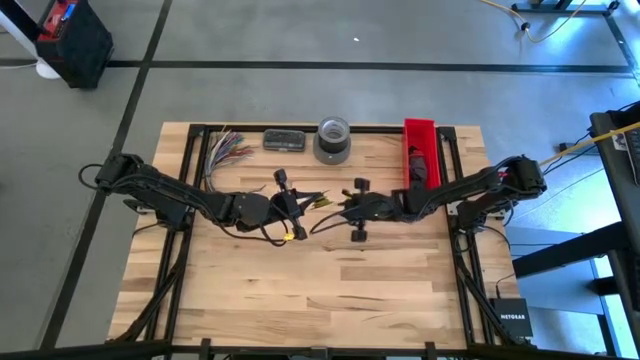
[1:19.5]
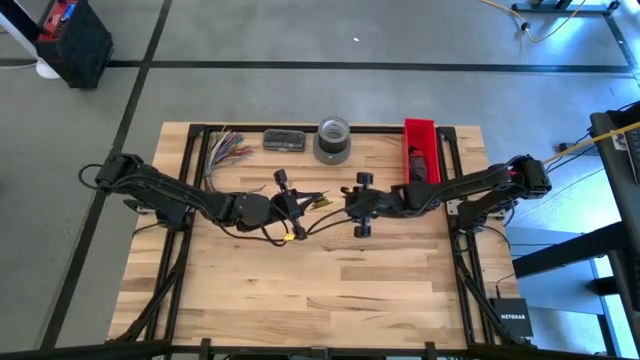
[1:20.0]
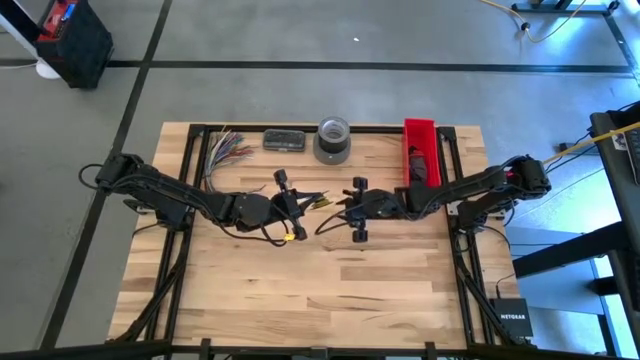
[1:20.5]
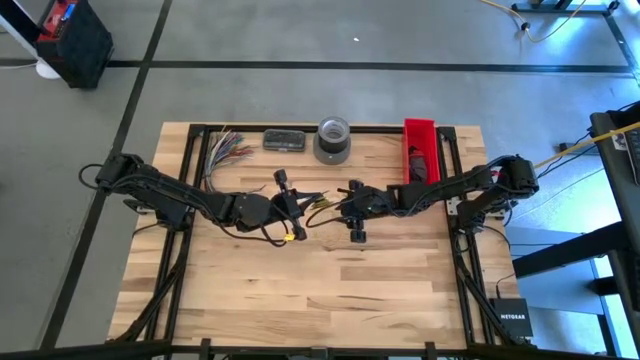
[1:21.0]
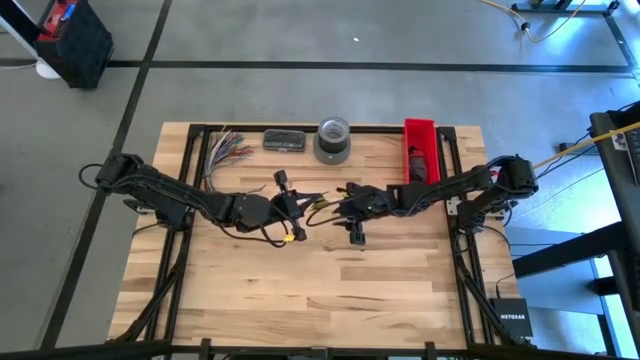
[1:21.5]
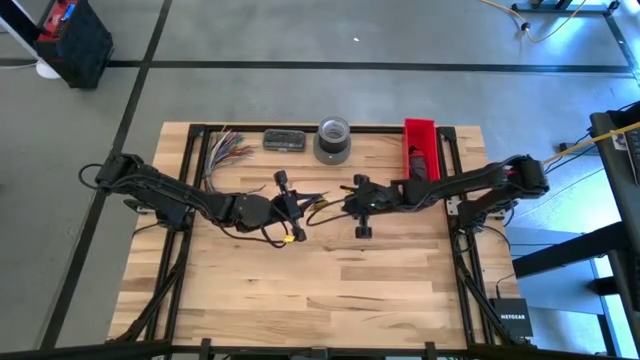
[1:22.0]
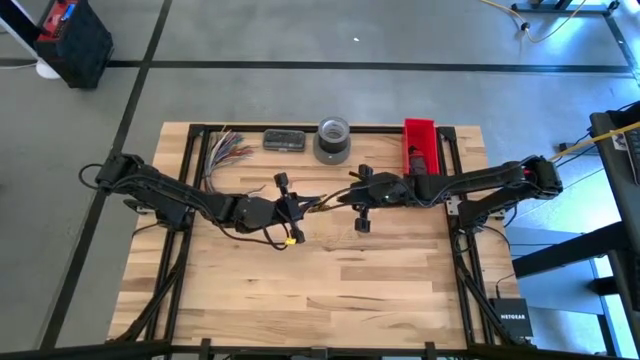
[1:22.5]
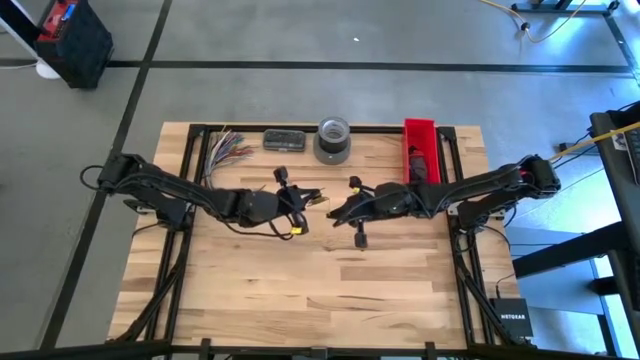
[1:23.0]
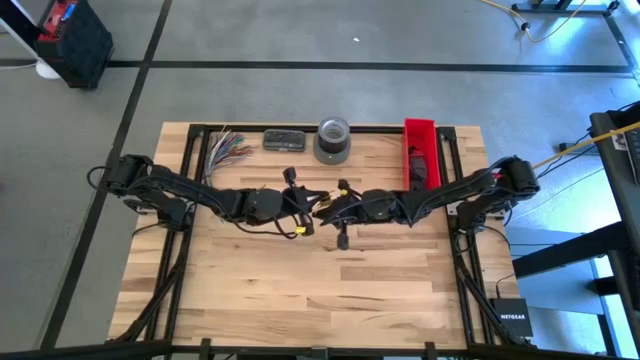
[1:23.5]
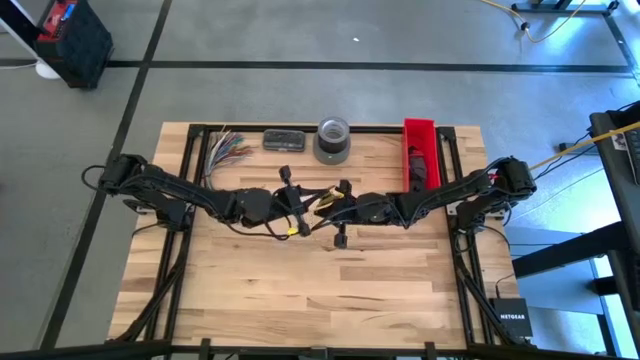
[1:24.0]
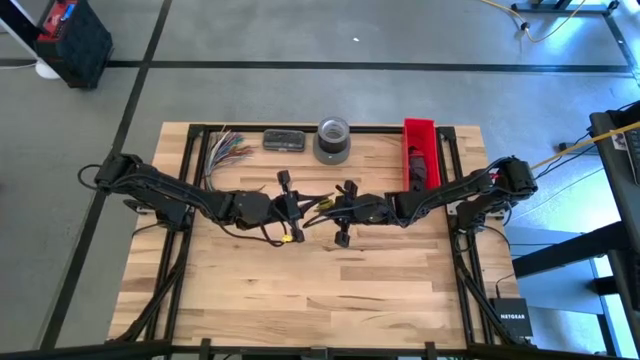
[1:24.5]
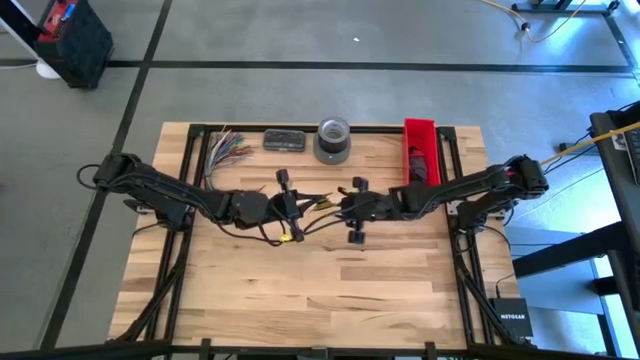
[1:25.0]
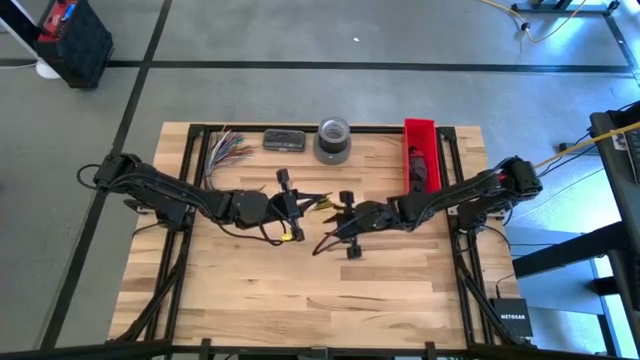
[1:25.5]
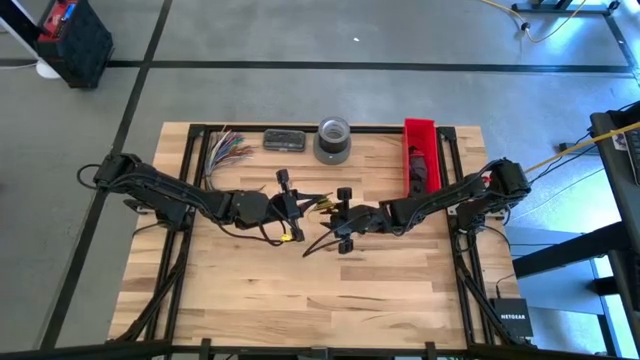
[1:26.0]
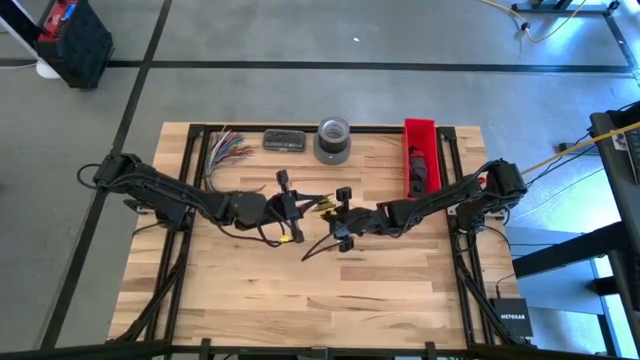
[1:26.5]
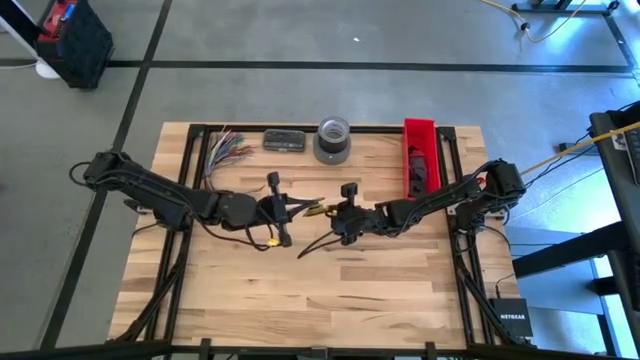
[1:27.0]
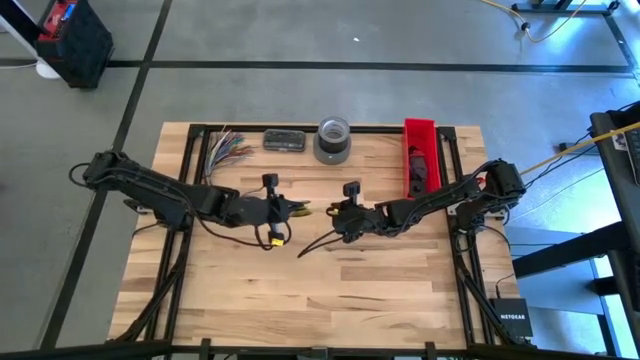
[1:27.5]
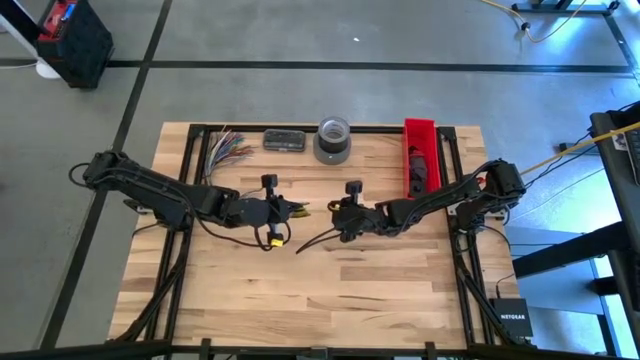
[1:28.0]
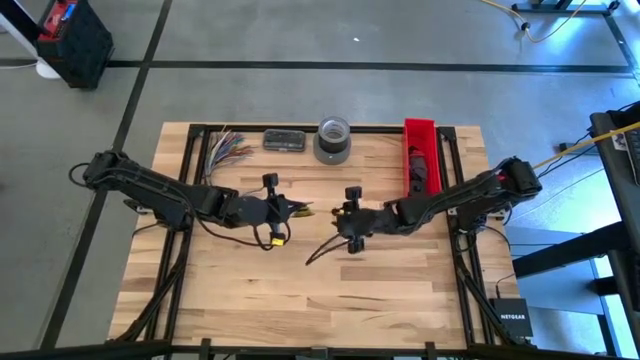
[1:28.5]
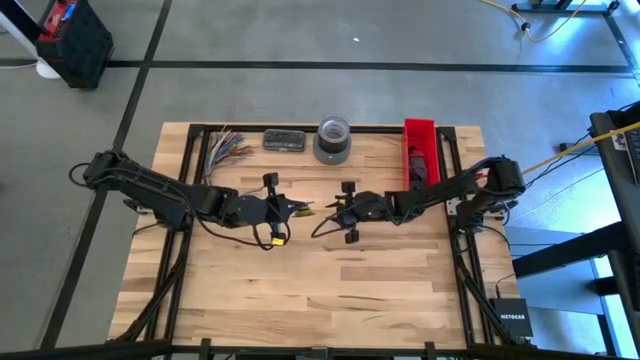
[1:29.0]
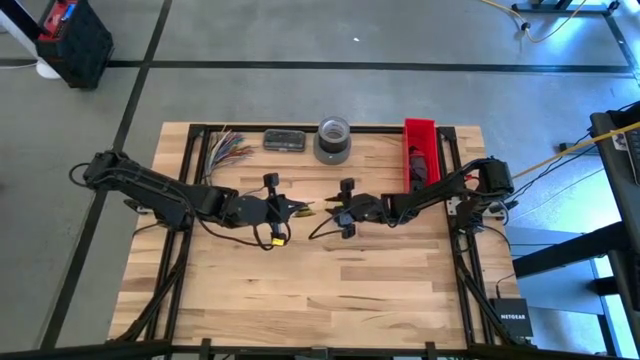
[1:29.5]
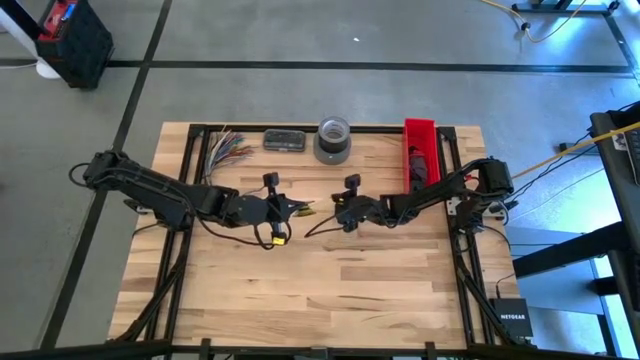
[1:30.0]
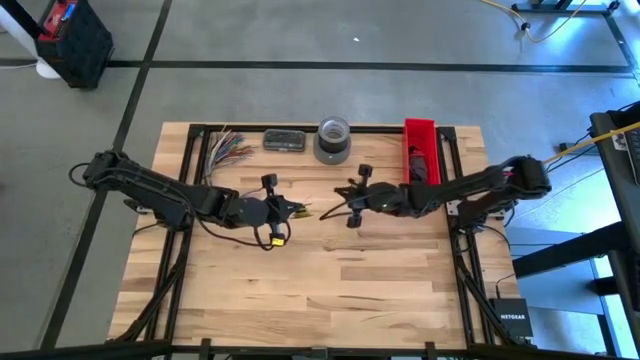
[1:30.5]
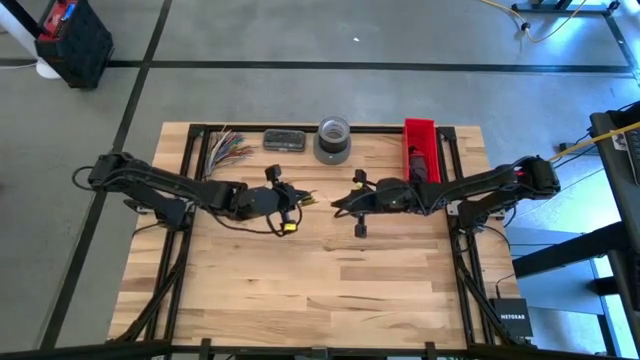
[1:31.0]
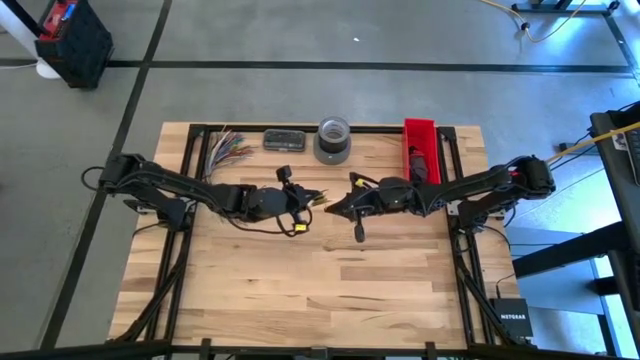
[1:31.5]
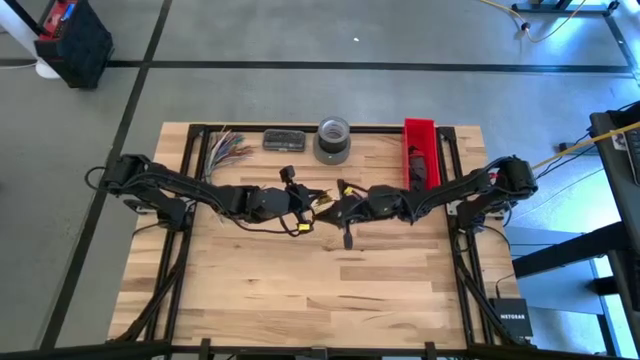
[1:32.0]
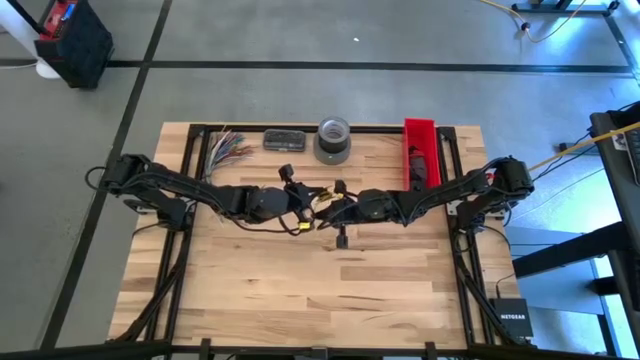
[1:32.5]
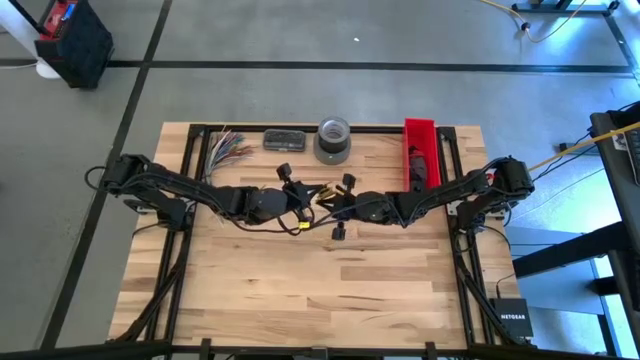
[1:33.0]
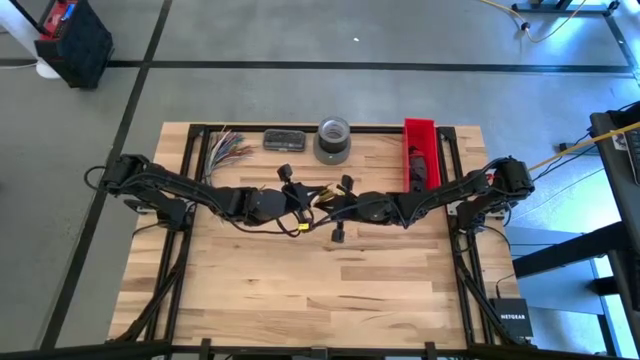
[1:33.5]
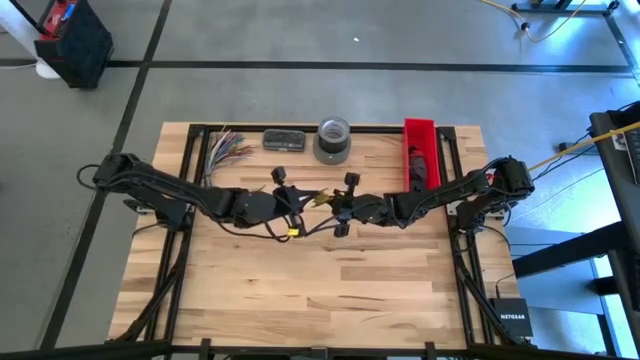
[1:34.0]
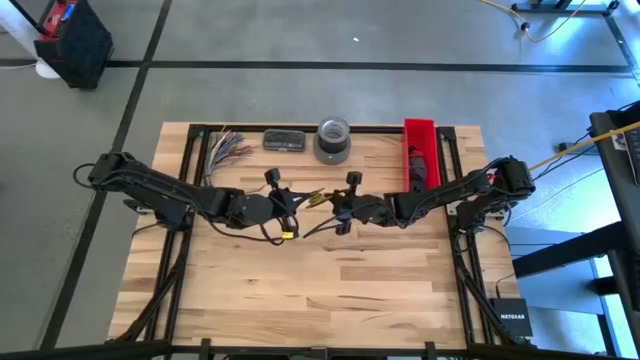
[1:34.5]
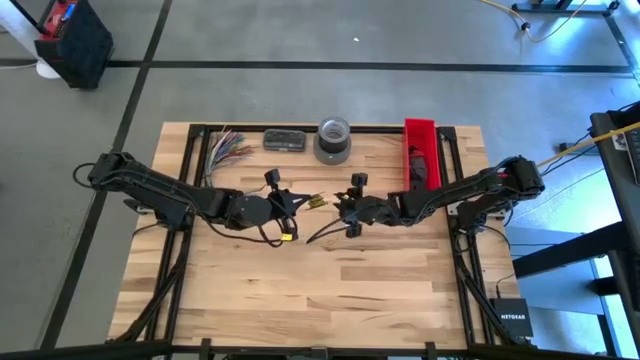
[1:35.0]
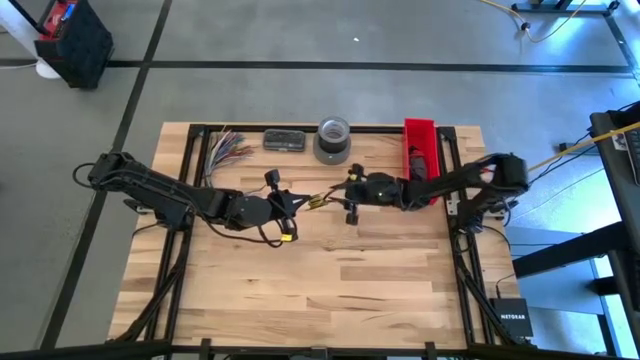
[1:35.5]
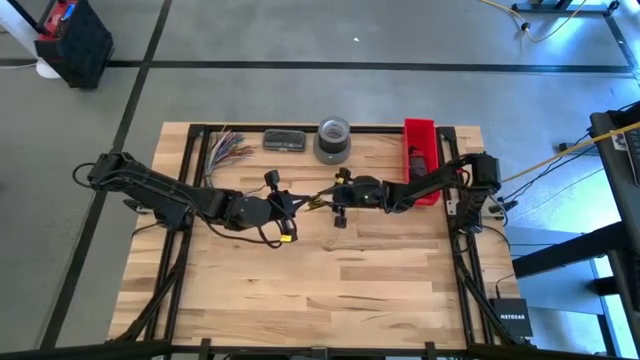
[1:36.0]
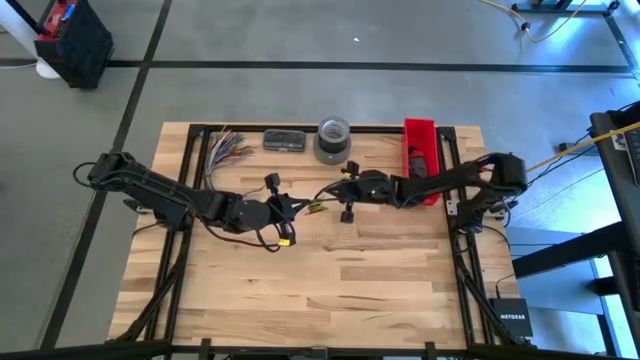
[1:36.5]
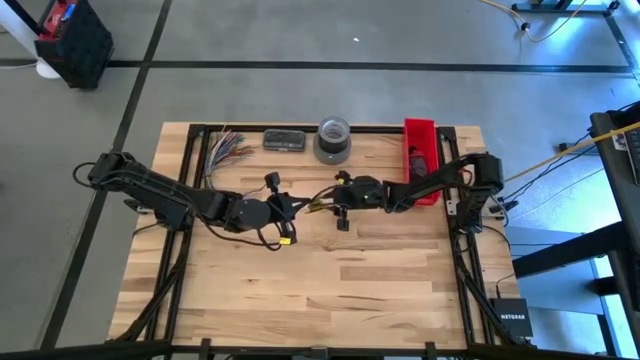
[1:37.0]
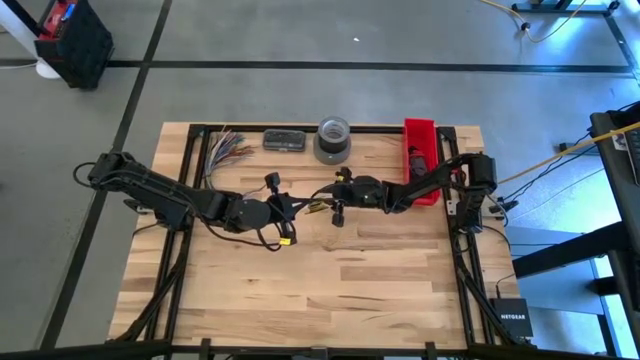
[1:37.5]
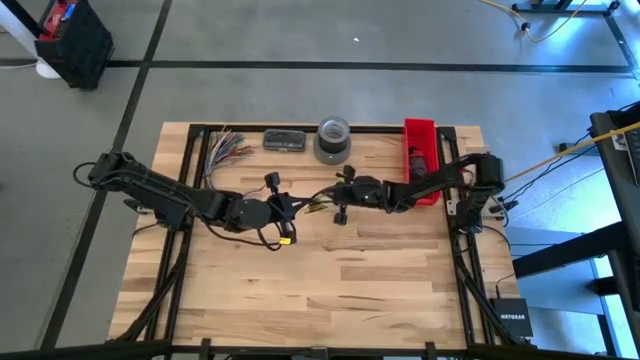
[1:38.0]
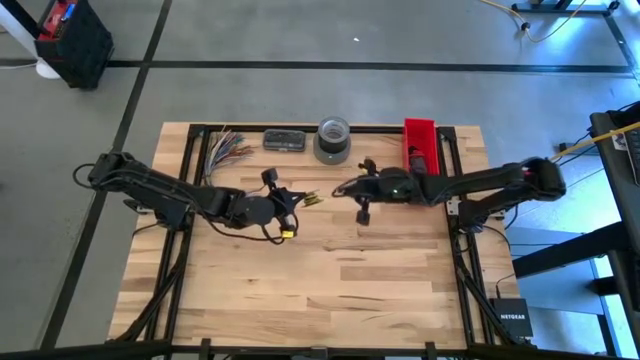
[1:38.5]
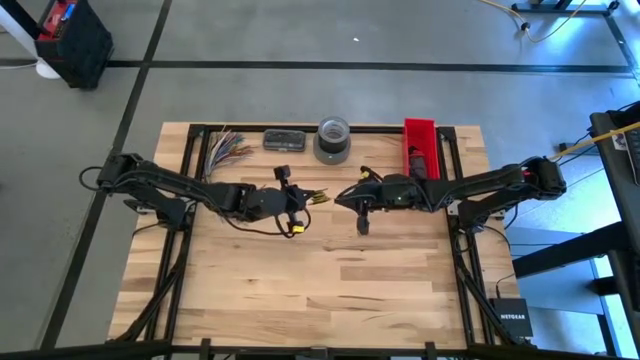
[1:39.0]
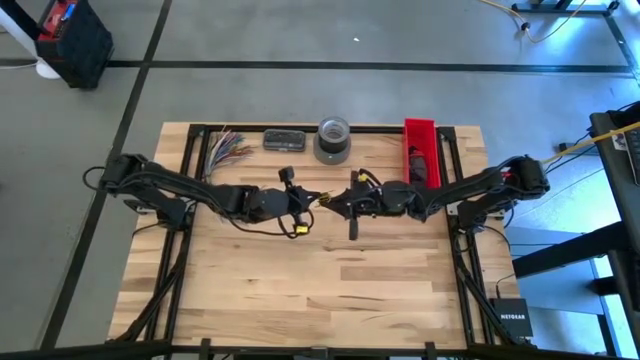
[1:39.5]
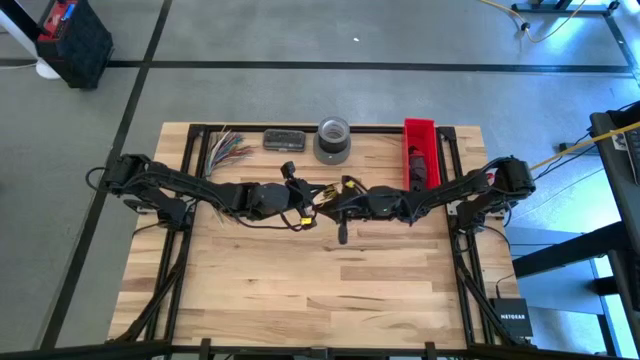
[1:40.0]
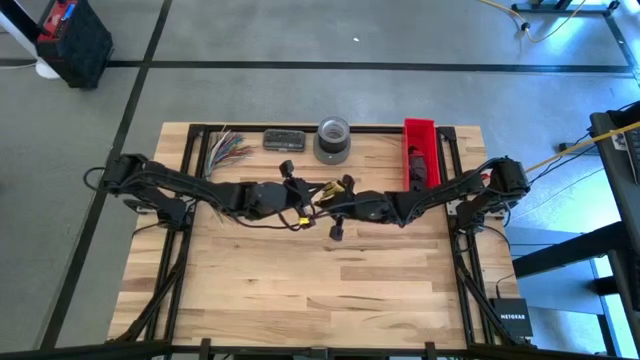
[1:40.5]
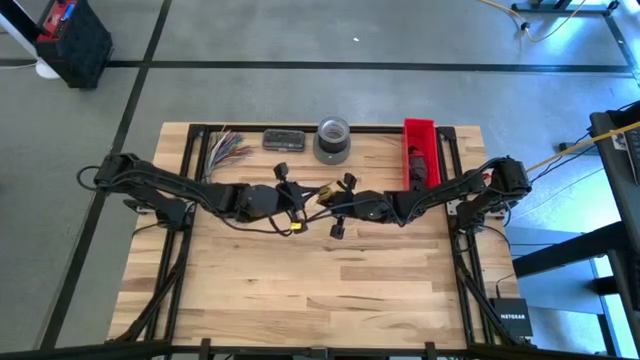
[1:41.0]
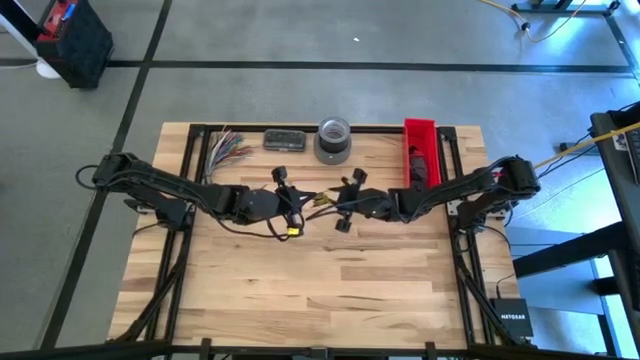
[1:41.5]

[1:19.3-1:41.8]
Task: Coil cords
Coil the yellow wire into the black spool
